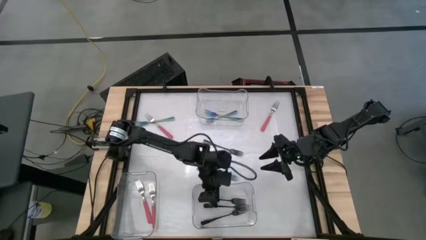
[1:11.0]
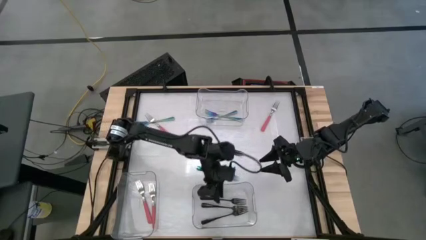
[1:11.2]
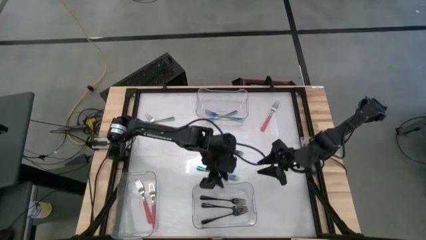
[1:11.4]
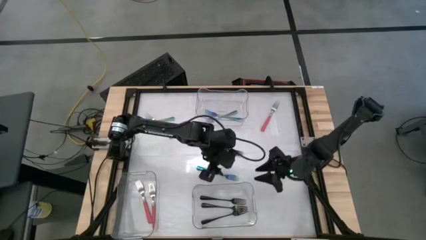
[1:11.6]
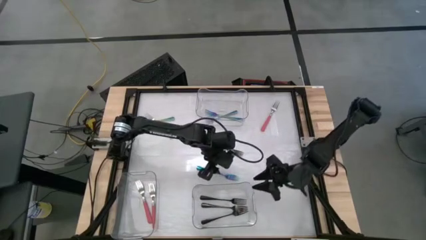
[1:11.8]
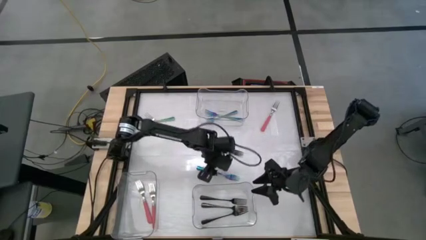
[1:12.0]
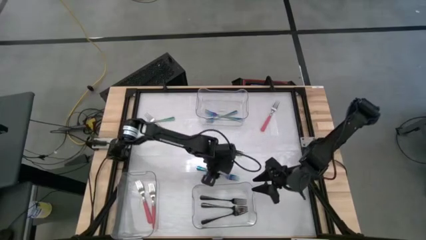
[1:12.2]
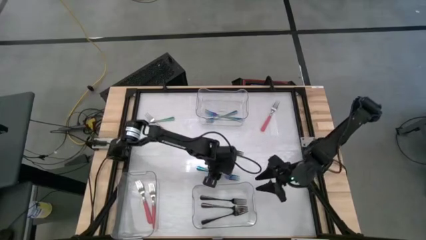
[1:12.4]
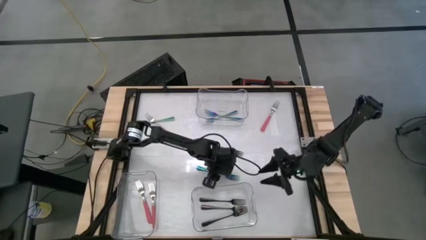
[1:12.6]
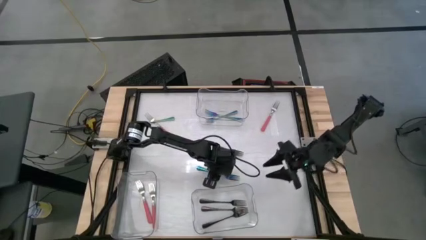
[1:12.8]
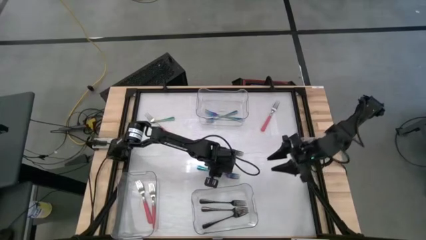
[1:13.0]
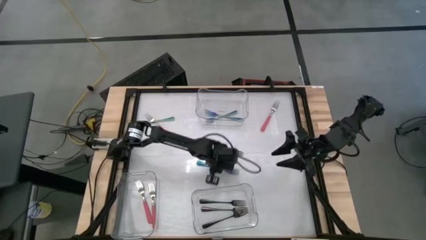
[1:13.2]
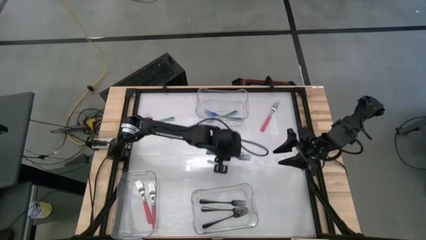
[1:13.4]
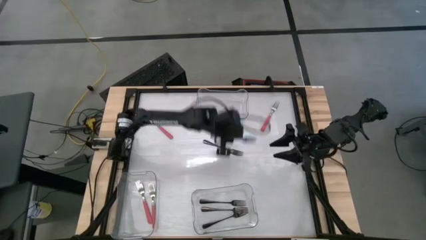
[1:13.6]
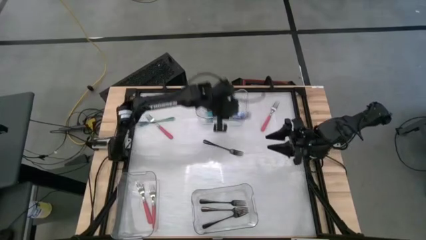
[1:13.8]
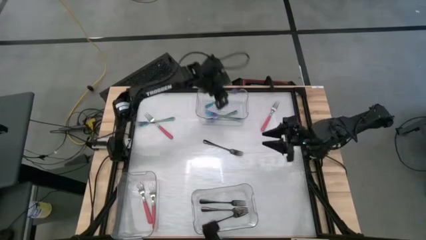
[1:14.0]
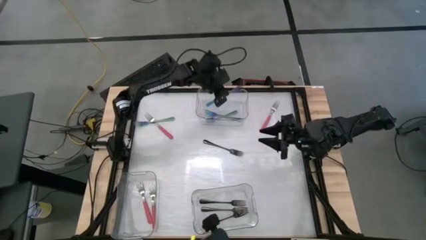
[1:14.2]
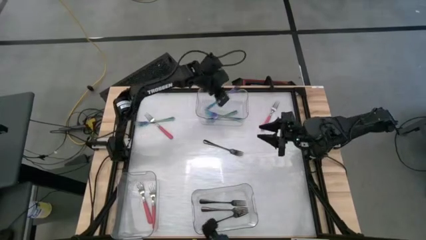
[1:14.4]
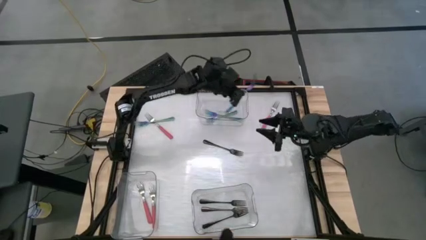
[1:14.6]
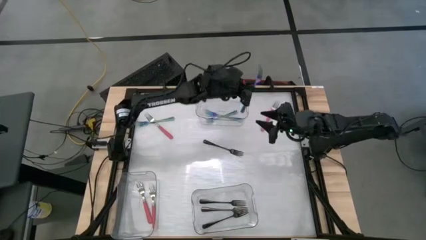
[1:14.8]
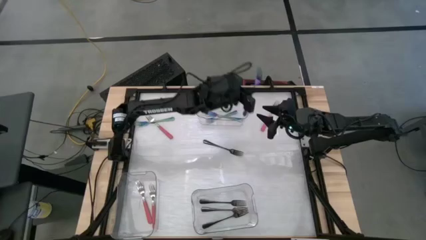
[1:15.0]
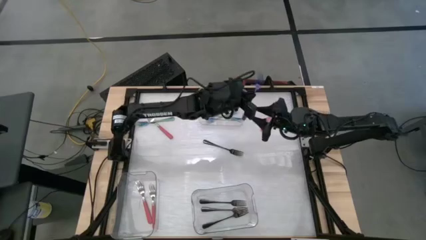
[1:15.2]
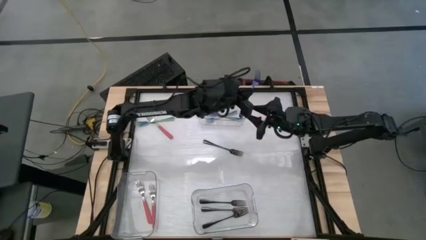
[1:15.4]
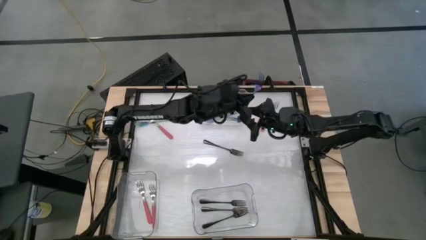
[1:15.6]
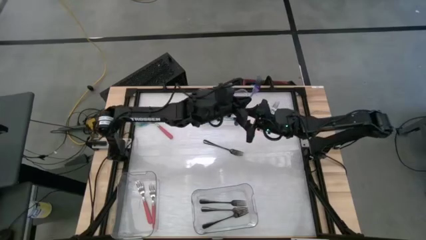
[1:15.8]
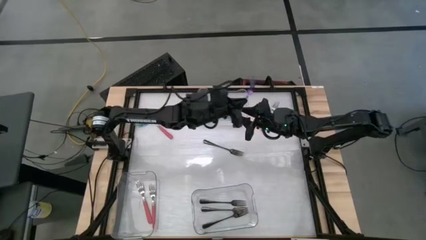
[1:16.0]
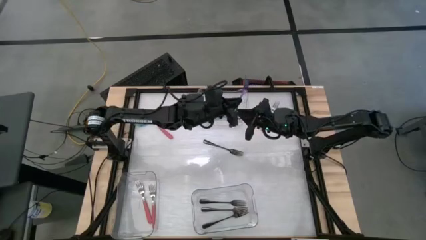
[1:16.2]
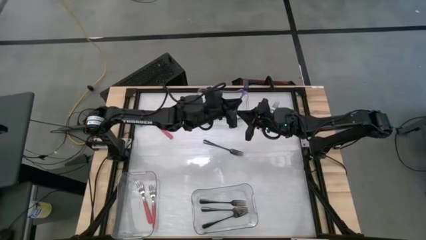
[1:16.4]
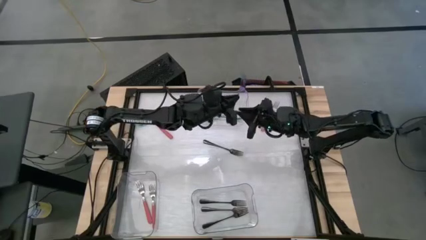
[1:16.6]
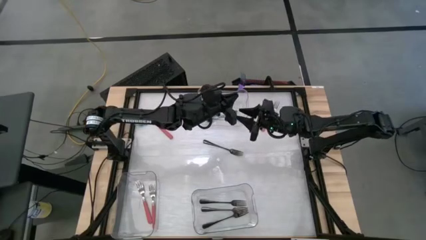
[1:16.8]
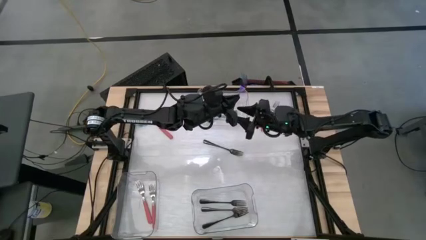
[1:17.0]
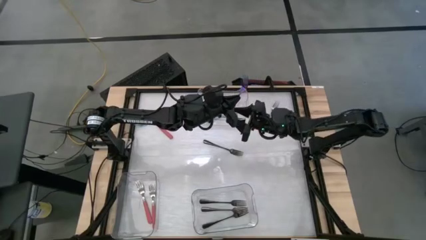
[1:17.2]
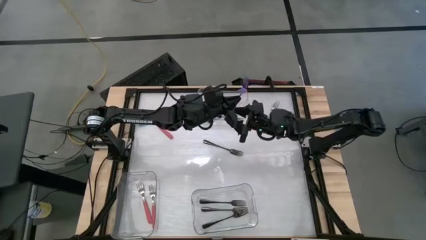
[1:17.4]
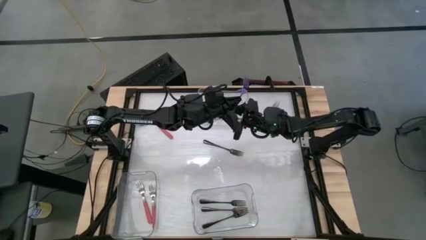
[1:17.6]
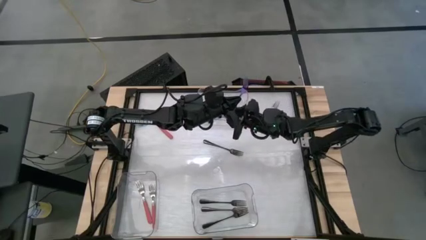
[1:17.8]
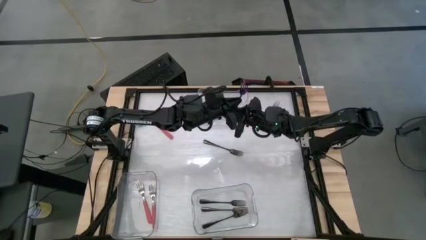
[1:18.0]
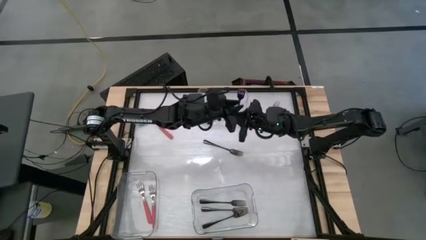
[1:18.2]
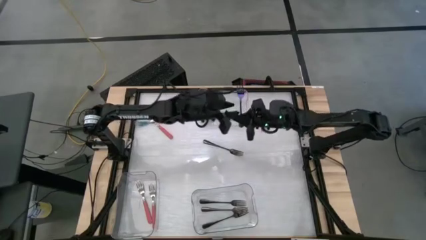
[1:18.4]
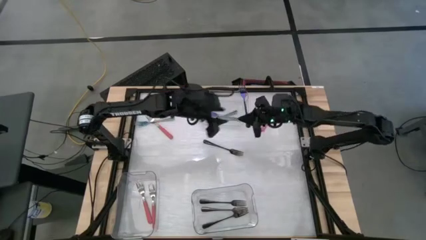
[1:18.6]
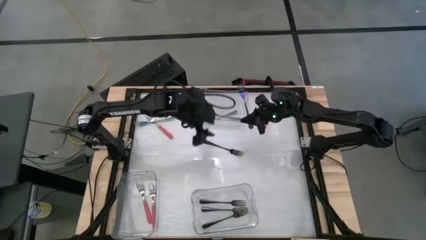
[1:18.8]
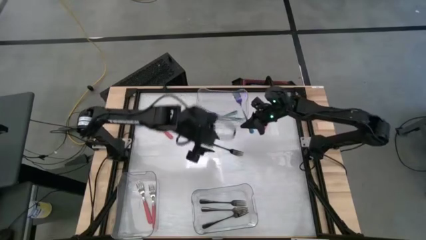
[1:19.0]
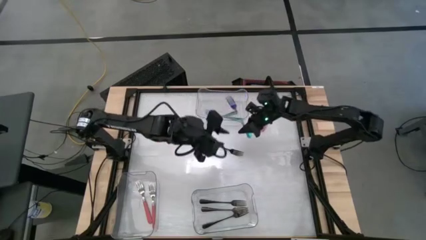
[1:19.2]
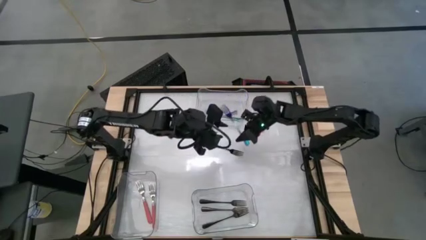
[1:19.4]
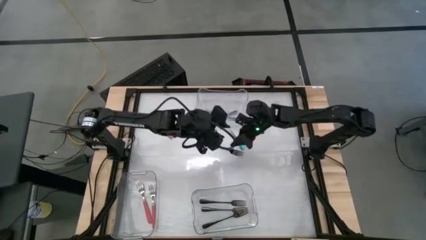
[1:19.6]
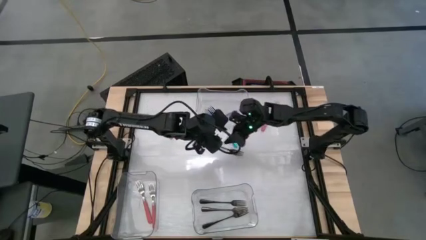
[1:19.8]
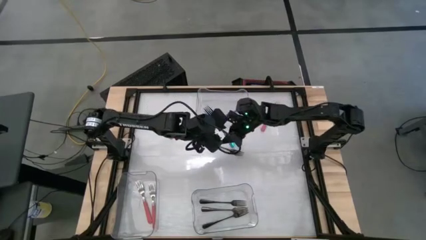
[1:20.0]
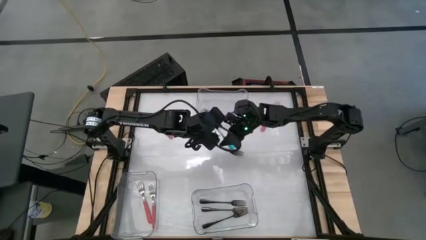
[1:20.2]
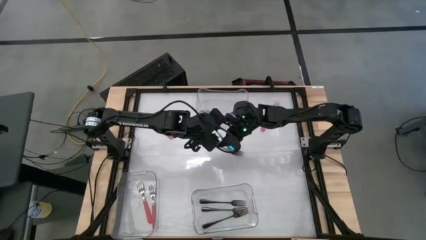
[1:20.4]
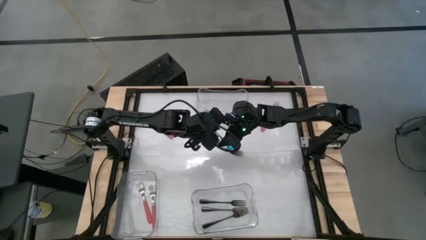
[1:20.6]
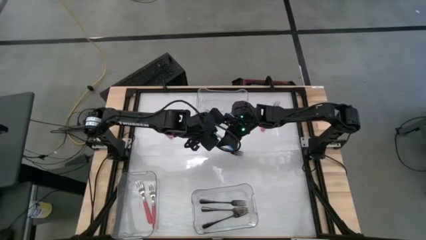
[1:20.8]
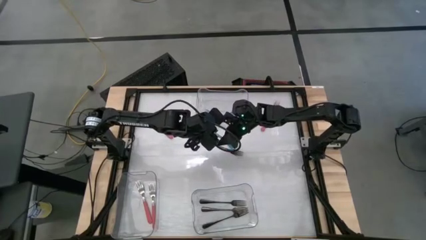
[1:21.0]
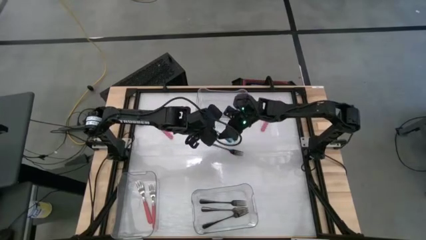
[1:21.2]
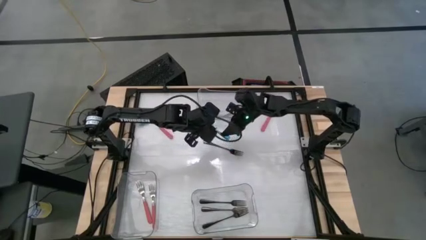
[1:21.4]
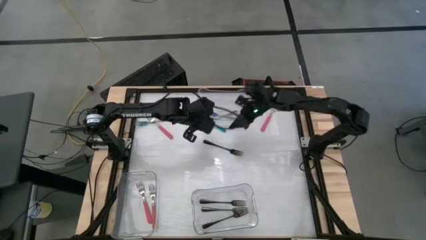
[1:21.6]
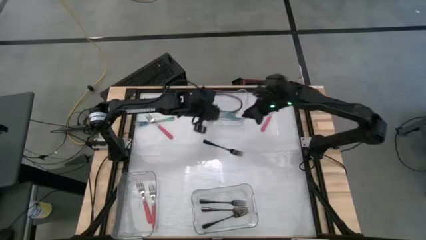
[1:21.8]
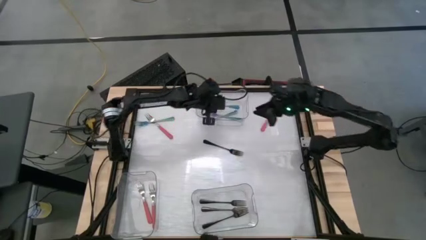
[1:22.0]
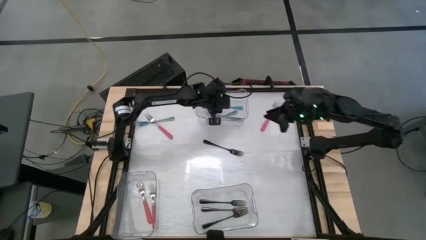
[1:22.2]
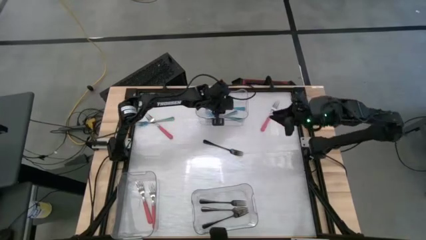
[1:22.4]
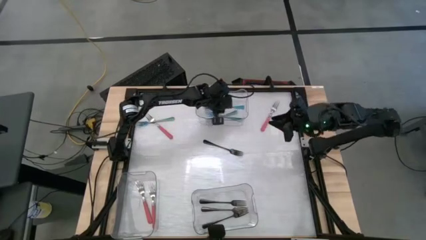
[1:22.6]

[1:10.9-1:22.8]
Task: Sort silverware by color (type)
Put the blue fork into the top transparent bin

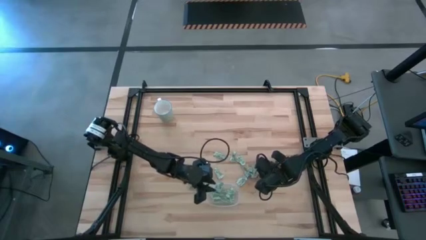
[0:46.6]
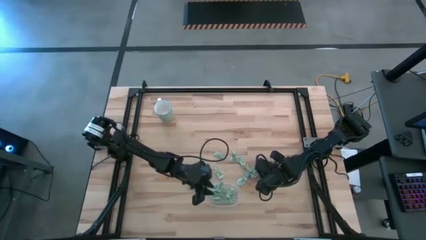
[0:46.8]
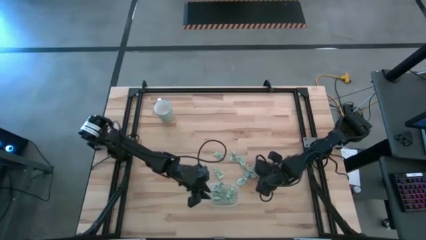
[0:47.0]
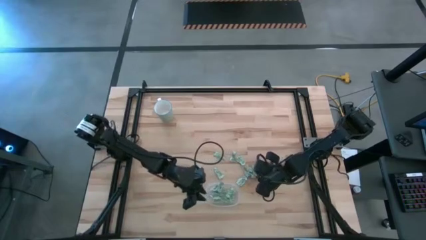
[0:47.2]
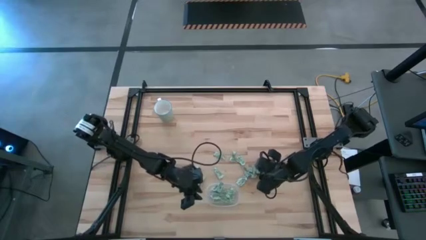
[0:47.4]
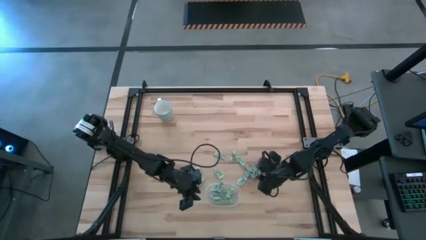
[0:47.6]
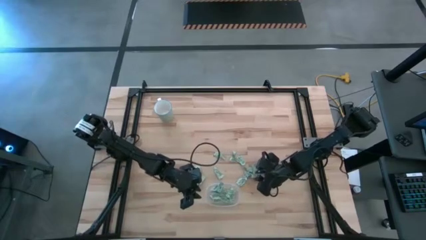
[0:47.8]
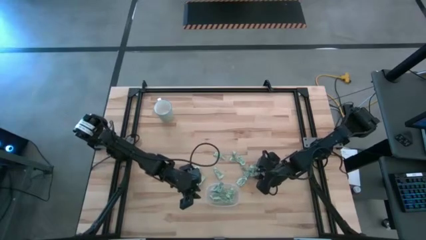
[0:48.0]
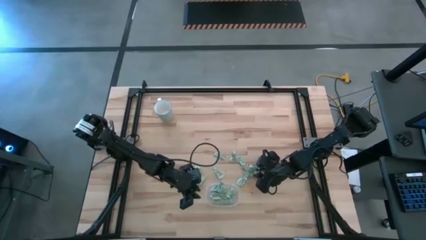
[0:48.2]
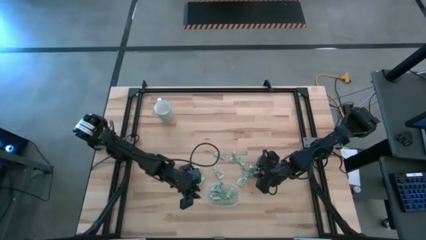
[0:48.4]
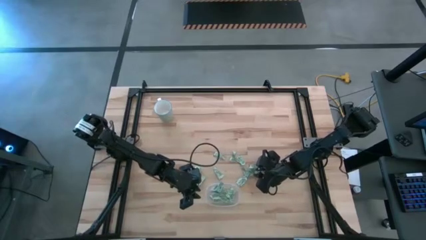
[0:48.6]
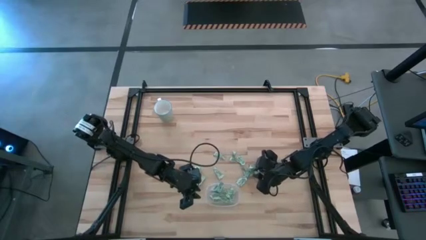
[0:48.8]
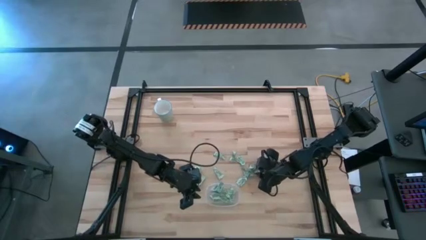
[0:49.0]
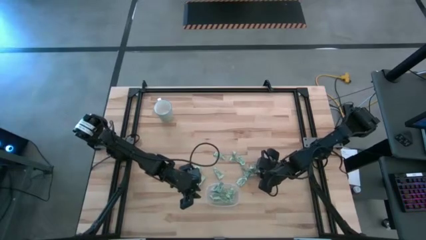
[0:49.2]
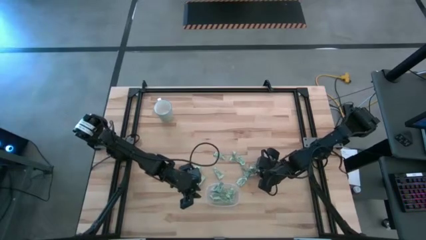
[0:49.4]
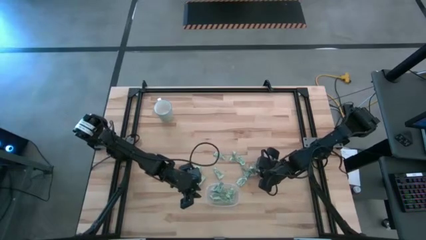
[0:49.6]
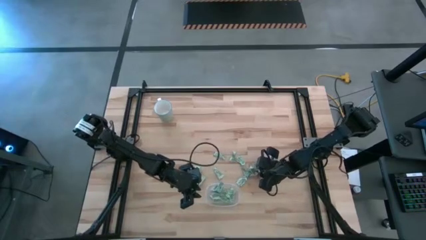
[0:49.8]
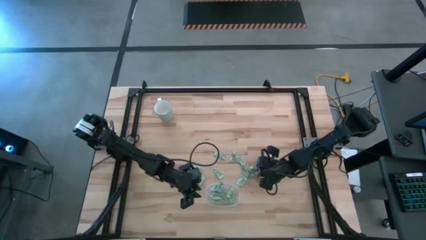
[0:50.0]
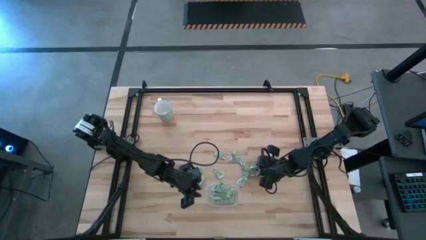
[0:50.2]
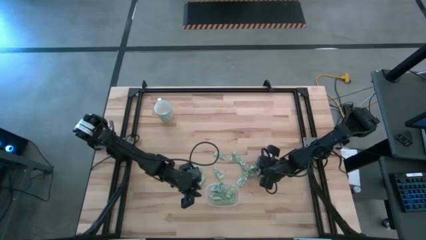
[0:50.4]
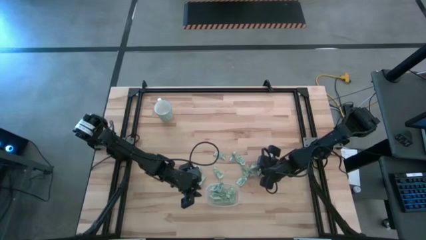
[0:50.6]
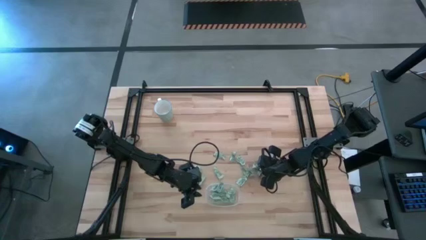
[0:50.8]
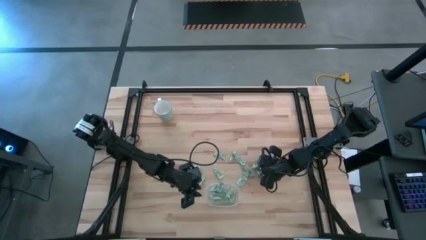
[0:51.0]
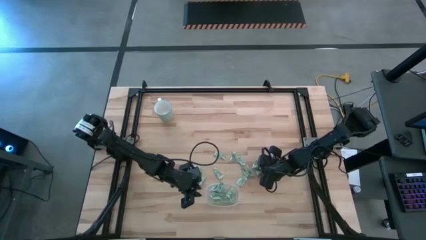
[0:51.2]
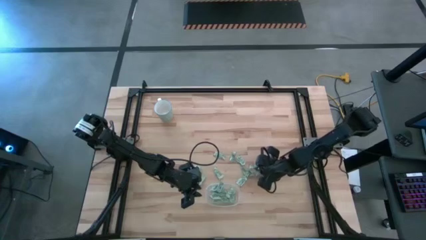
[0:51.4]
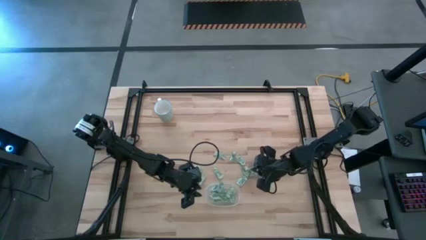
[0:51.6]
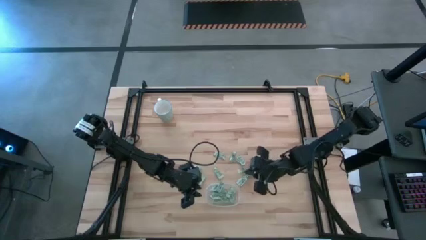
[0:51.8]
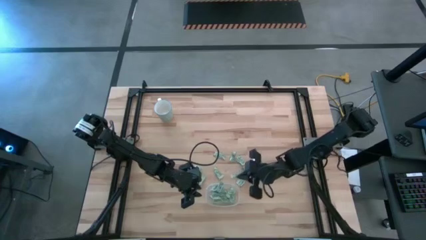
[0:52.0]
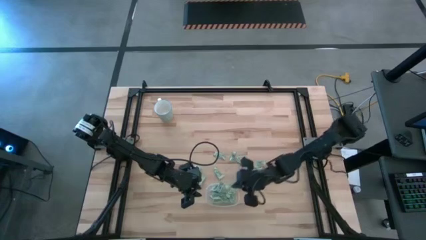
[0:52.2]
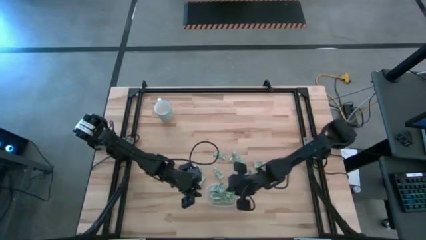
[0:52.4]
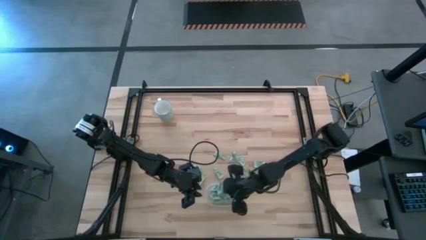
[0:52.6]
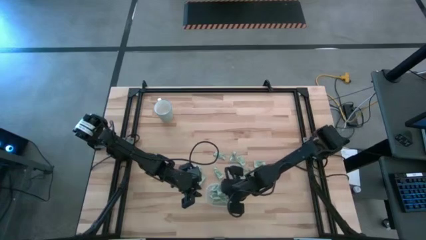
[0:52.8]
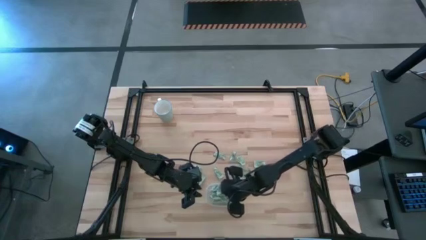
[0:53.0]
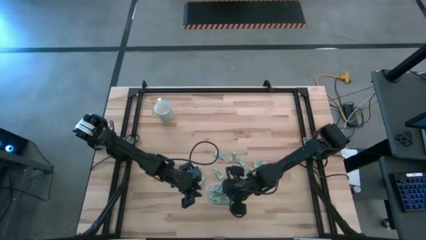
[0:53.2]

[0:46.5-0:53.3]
Task: Pick and place Stevia / Truvia into bins
Put the stevia packet into the transparent container
